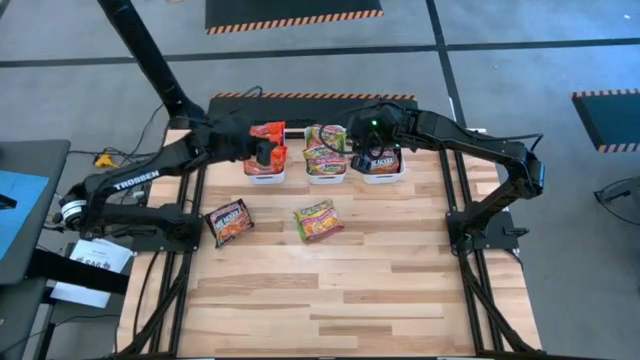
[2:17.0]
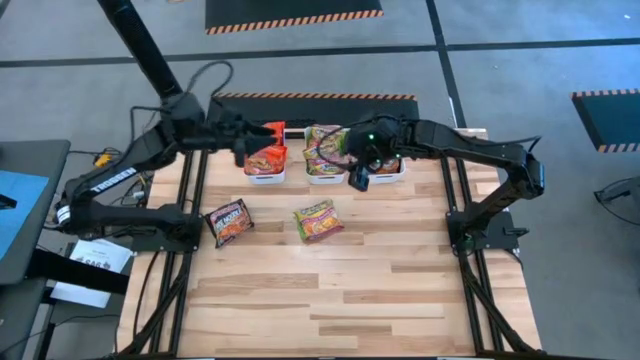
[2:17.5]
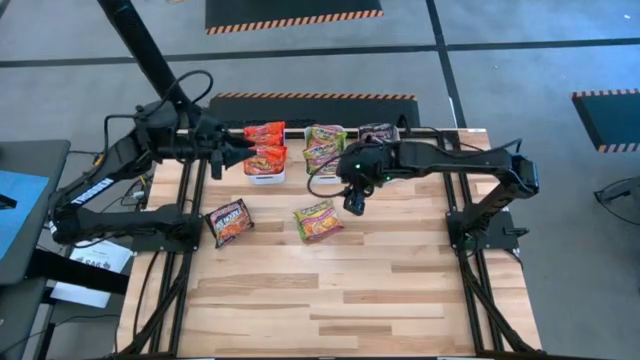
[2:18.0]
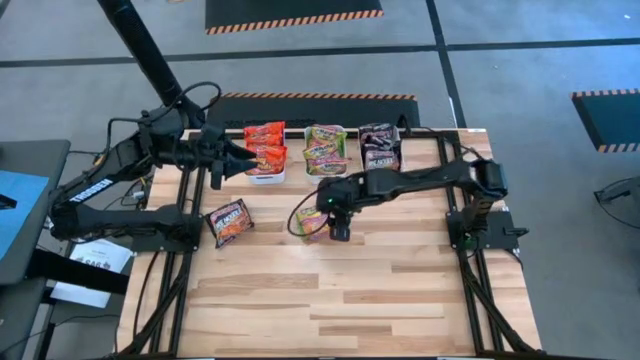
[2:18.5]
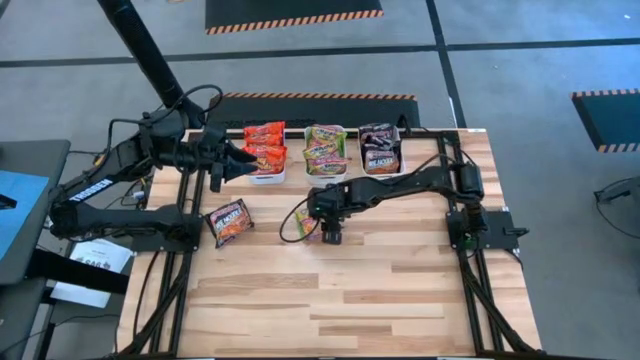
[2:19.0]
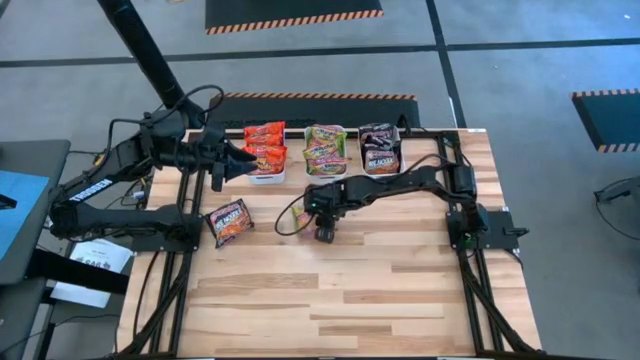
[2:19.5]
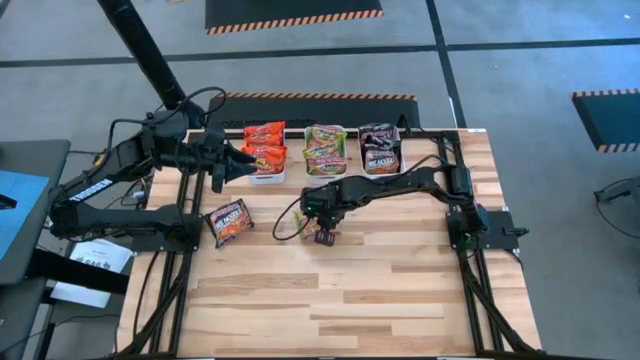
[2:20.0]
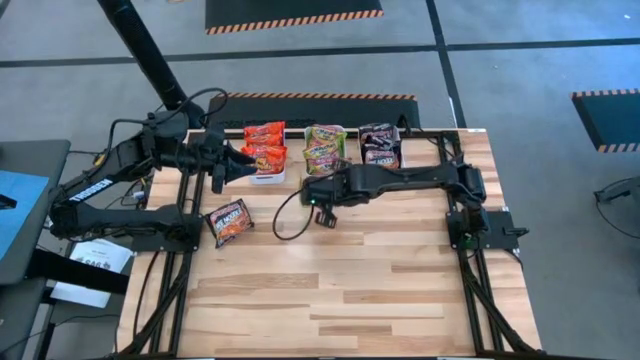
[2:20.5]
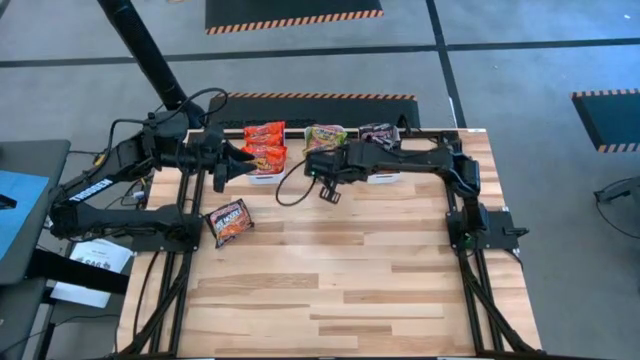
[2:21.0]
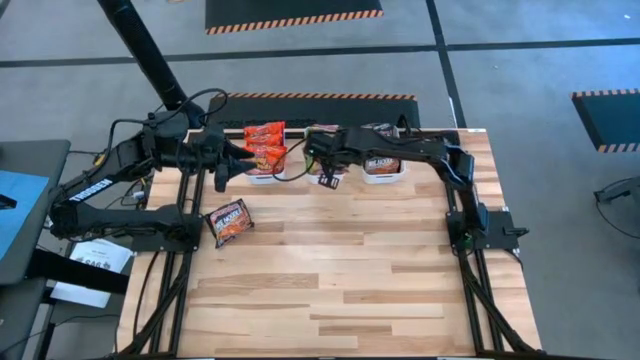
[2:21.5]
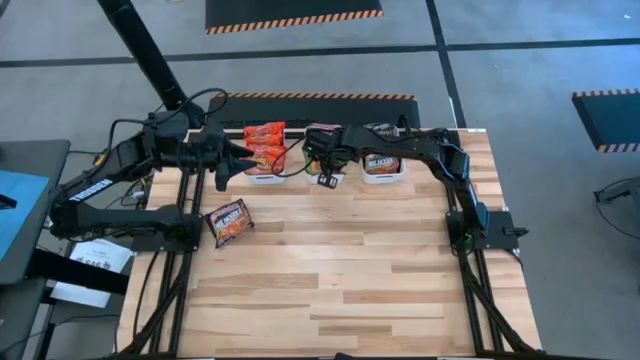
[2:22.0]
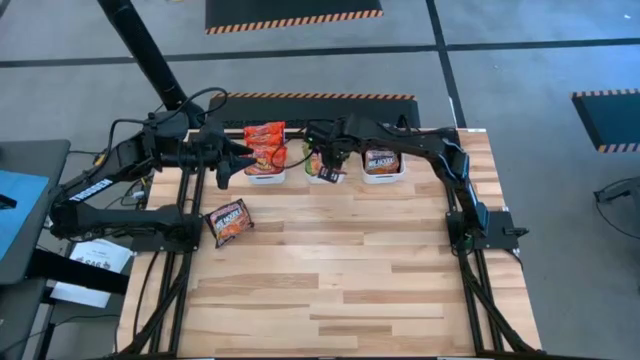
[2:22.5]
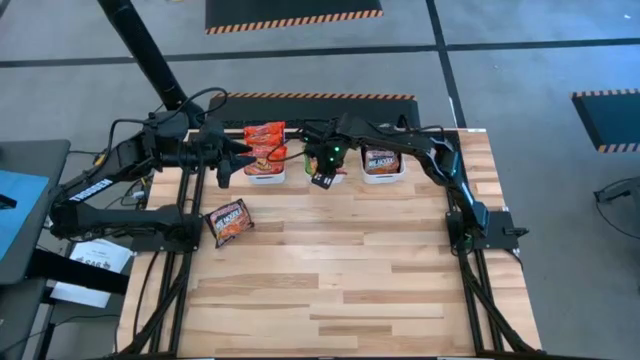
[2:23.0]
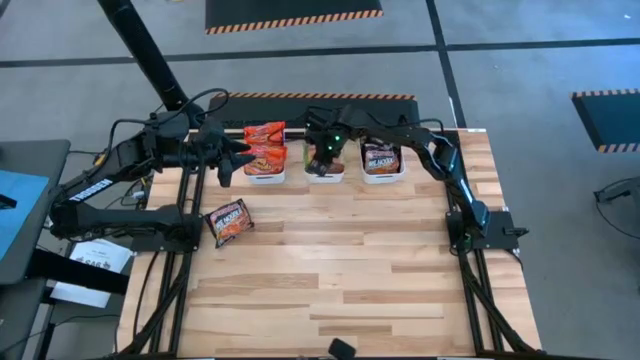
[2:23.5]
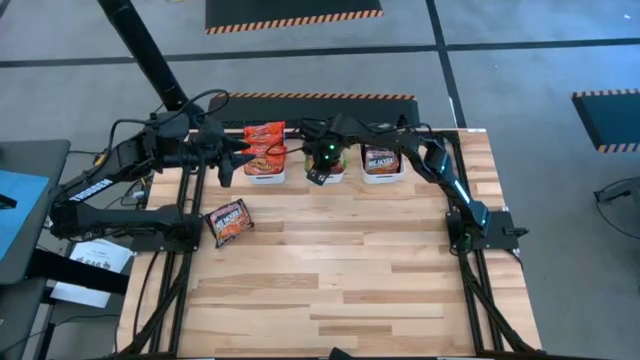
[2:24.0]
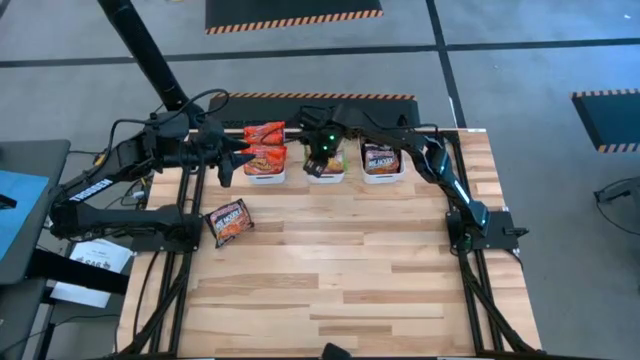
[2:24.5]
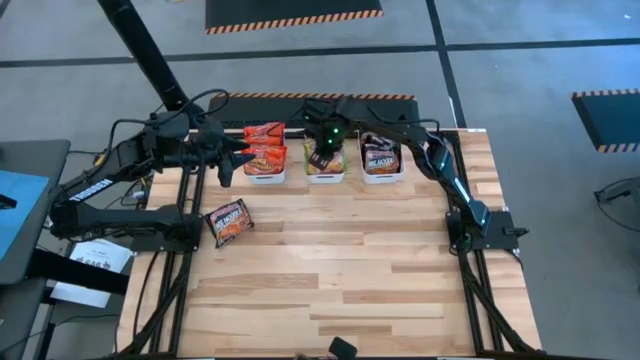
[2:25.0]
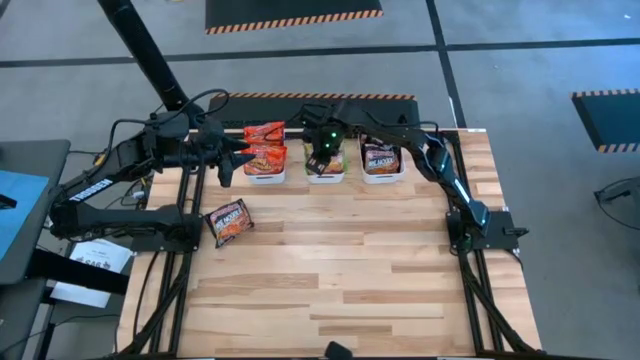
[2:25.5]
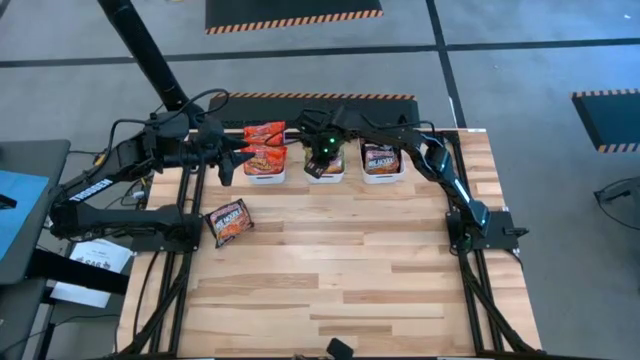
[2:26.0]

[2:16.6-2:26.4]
Task: Sort Maruchan noodles
Put the green noodle pack into the middle white bin

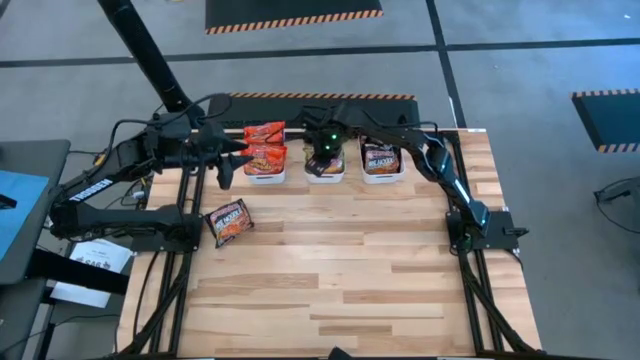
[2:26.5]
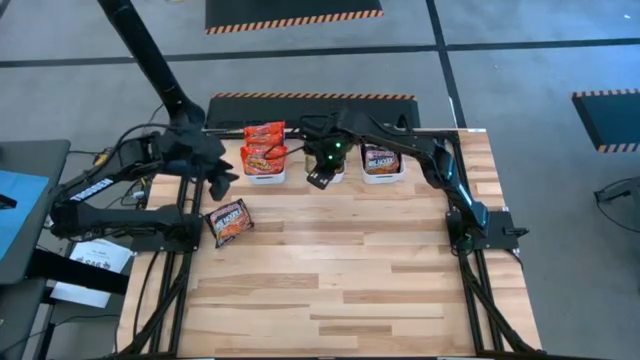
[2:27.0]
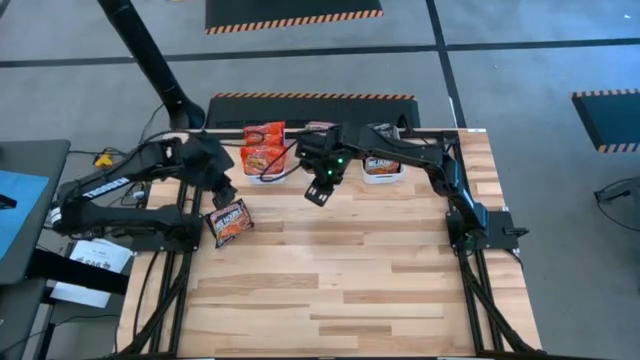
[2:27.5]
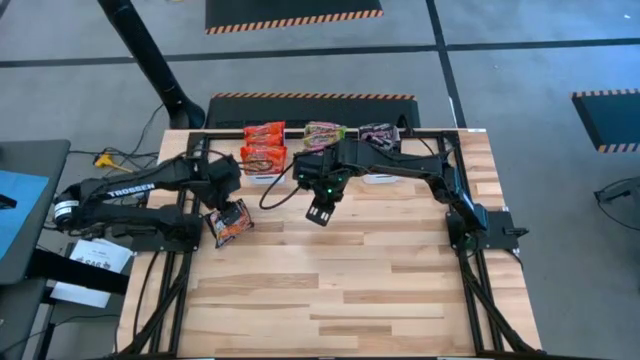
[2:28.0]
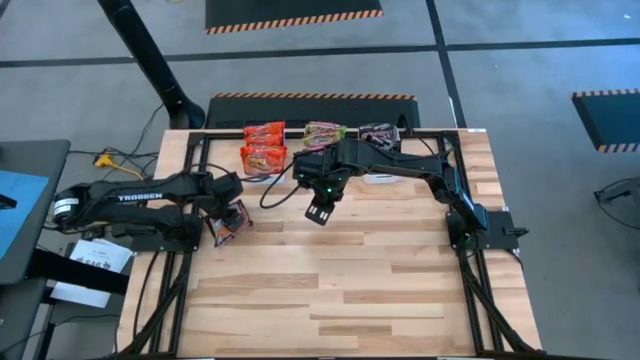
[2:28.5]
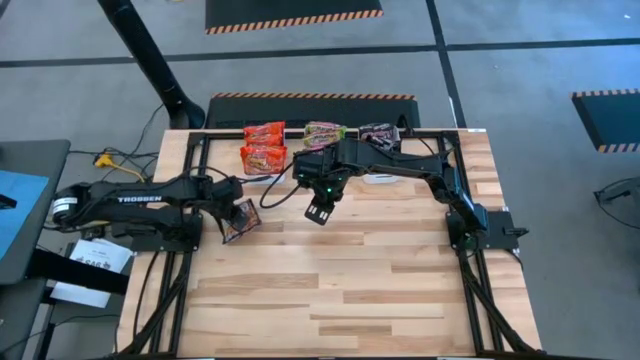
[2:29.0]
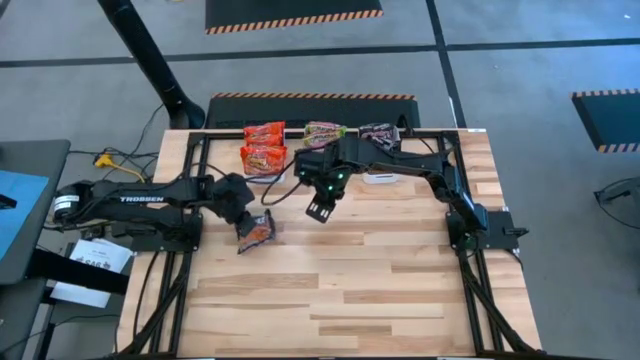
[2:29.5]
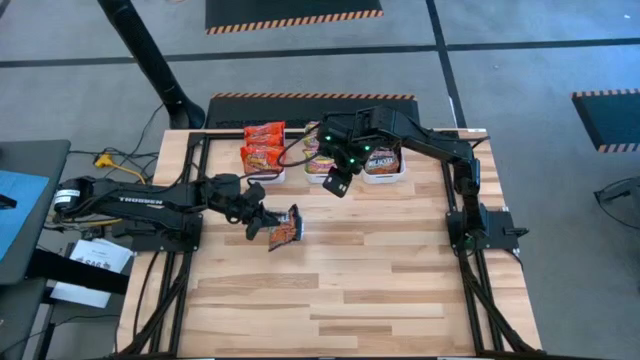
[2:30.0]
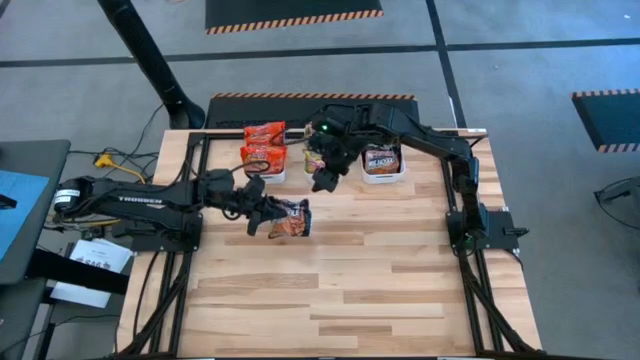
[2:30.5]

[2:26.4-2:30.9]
Put the black noodle pack into the right white bin

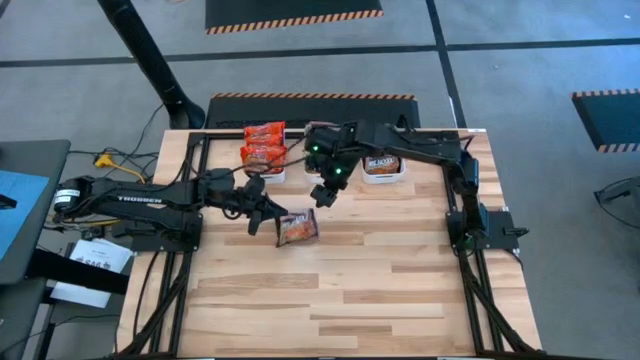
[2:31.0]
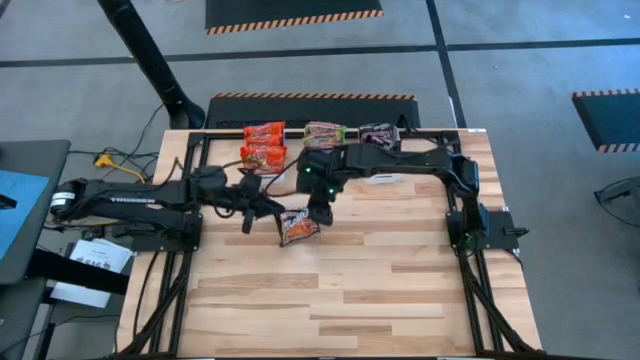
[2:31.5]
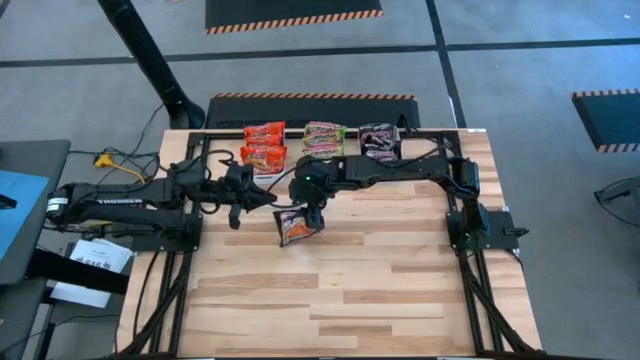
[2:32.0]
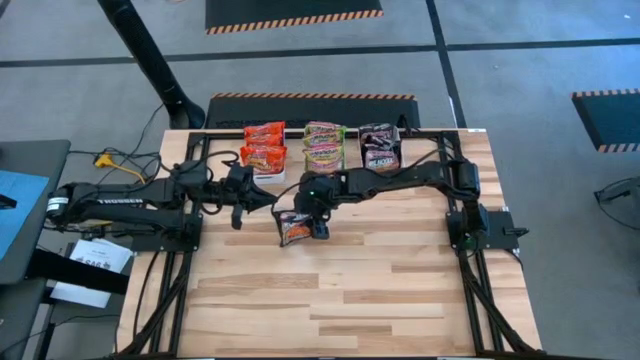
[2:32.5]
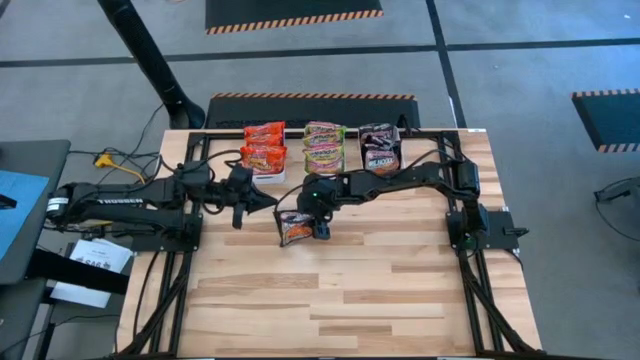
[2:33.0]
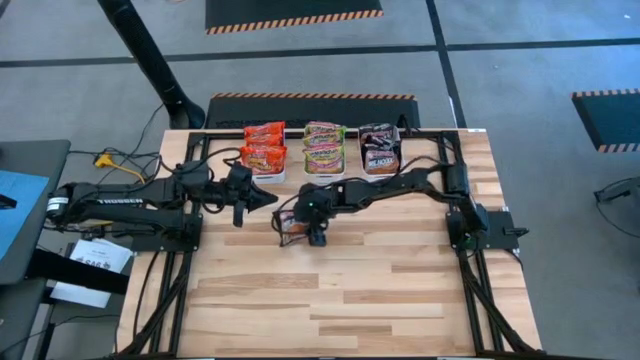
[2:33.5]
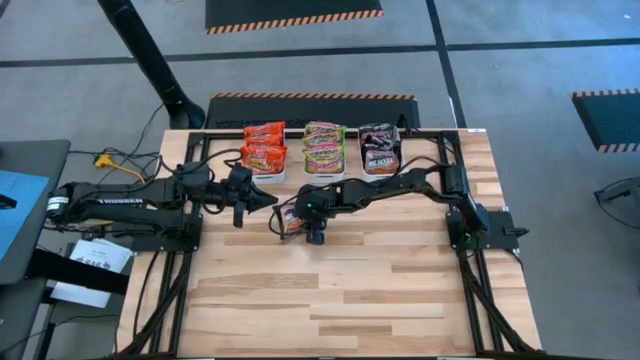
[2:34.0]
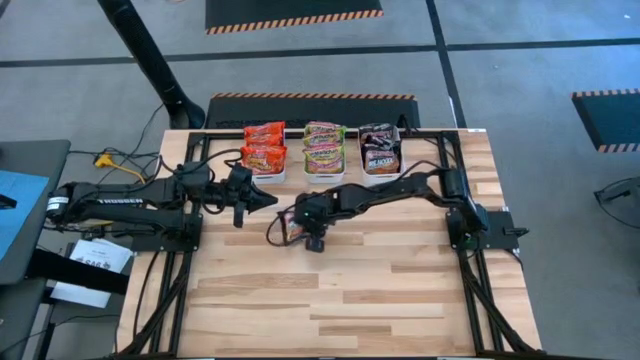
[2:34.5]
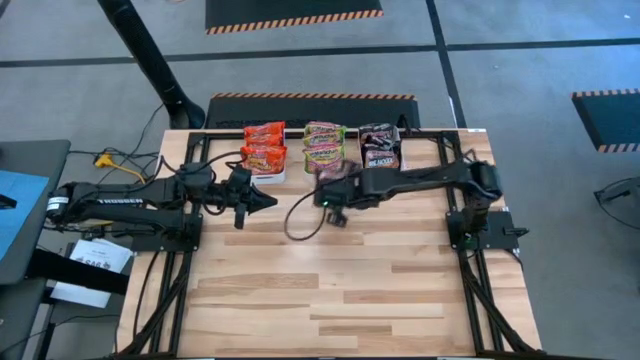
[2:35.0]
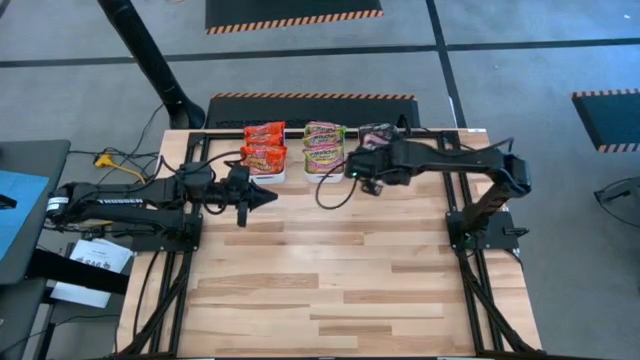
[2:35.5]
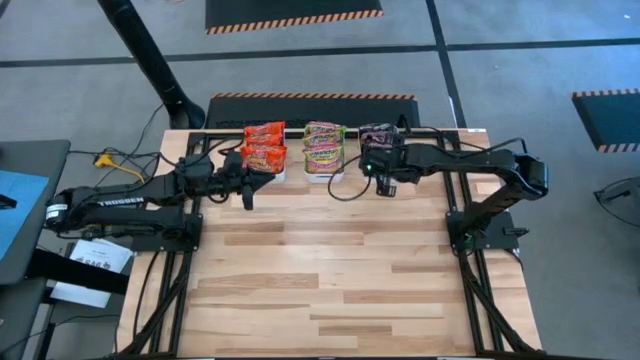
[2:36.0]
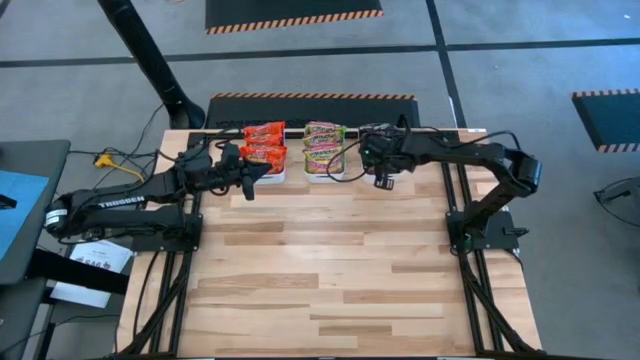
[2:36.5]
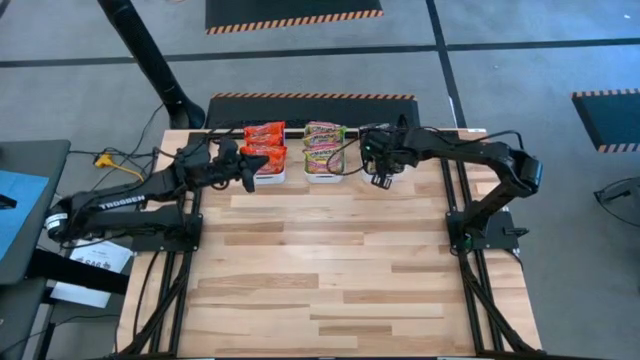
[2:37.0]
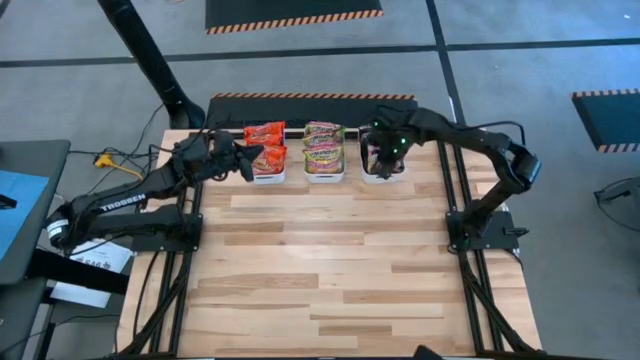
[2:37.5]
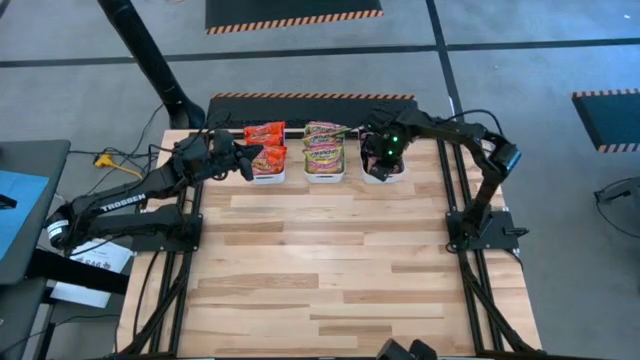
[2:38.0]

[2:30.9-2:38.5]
Put the black noodle pack into the right white bin
